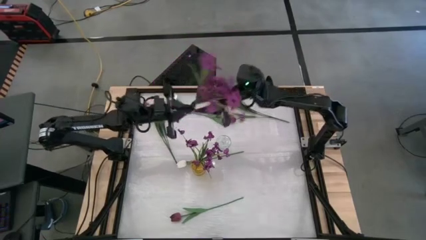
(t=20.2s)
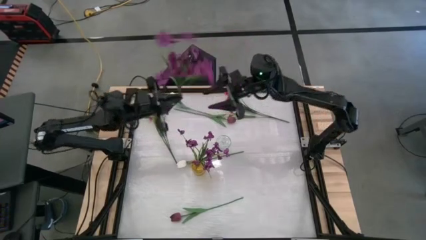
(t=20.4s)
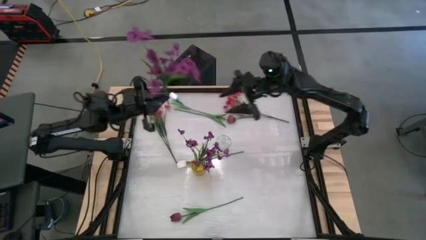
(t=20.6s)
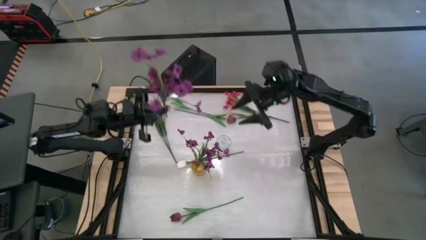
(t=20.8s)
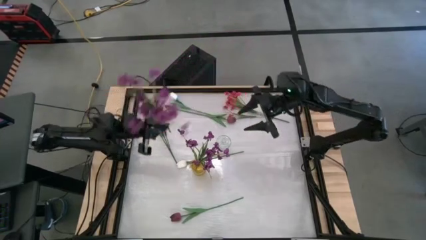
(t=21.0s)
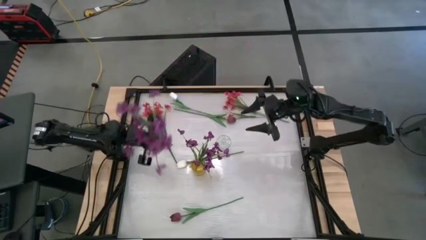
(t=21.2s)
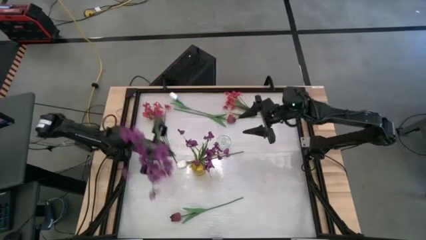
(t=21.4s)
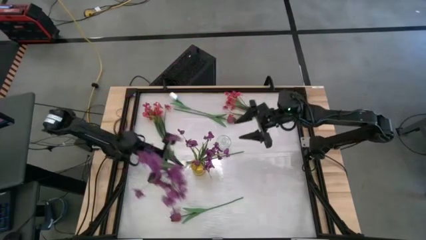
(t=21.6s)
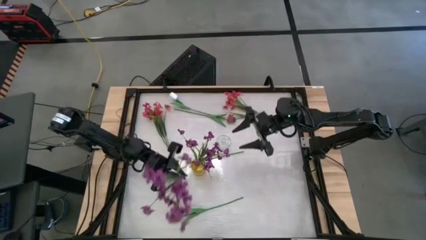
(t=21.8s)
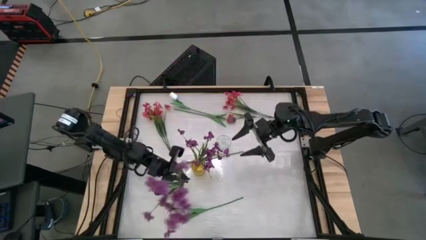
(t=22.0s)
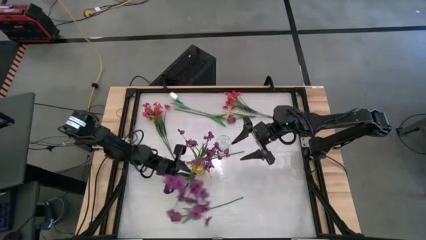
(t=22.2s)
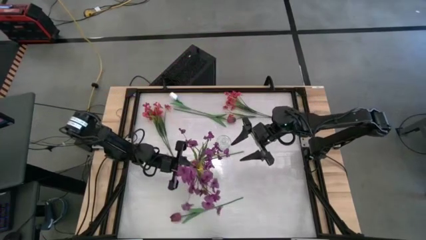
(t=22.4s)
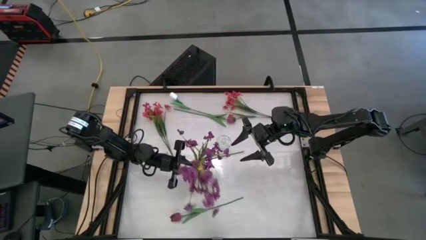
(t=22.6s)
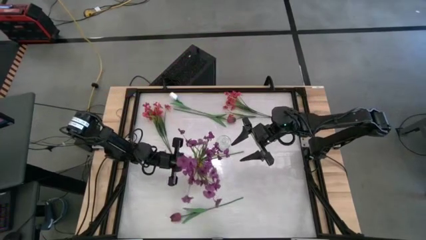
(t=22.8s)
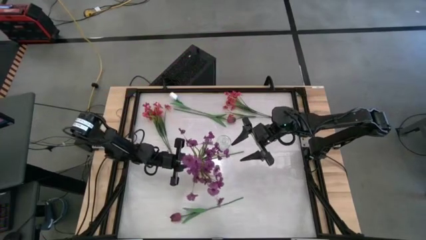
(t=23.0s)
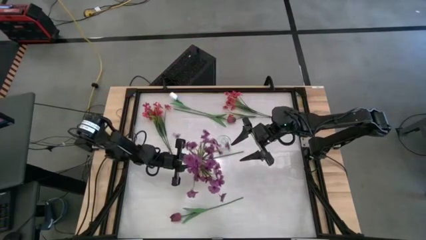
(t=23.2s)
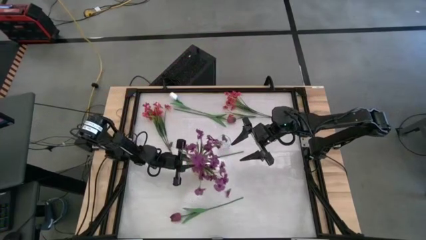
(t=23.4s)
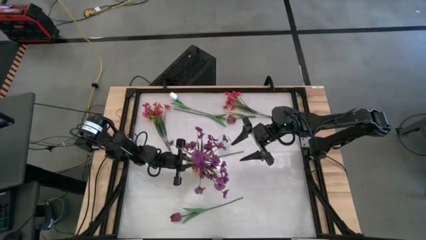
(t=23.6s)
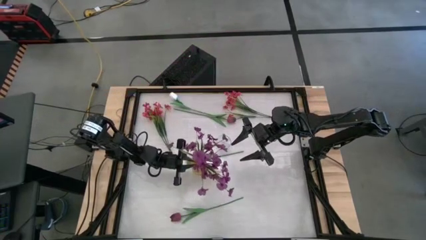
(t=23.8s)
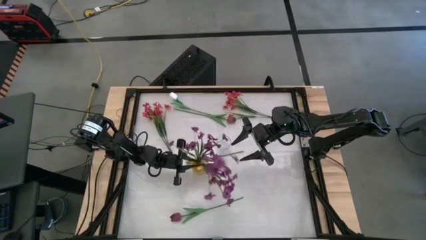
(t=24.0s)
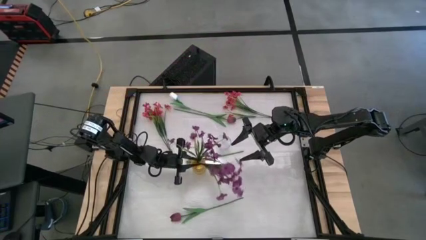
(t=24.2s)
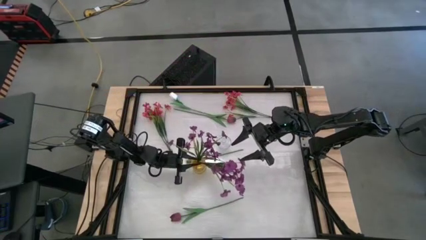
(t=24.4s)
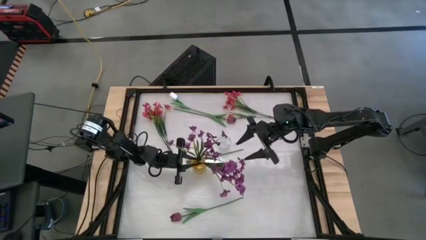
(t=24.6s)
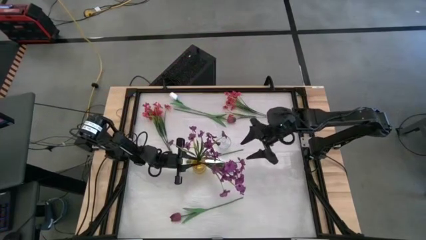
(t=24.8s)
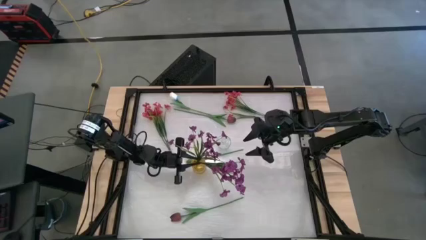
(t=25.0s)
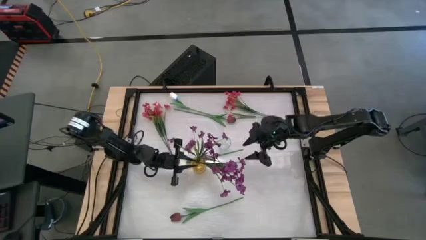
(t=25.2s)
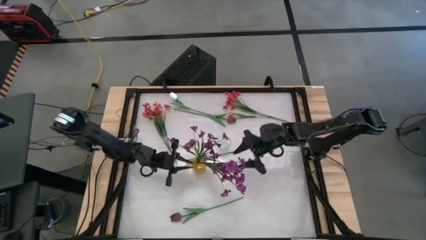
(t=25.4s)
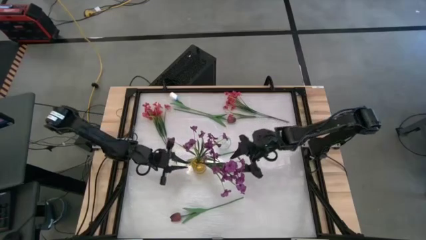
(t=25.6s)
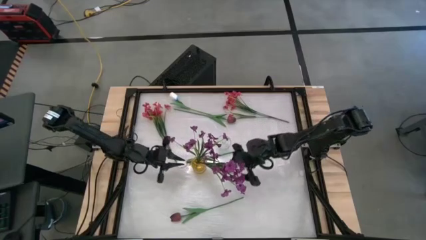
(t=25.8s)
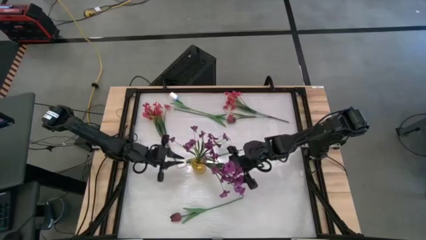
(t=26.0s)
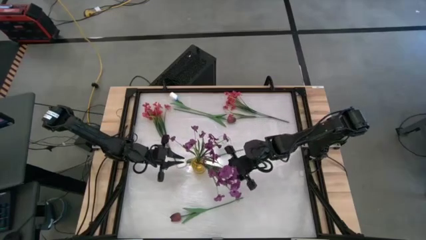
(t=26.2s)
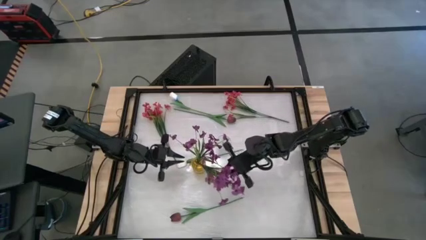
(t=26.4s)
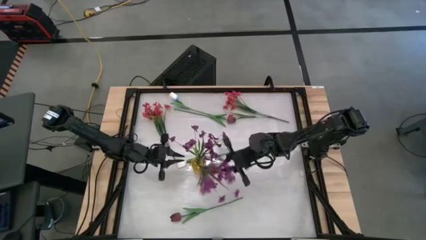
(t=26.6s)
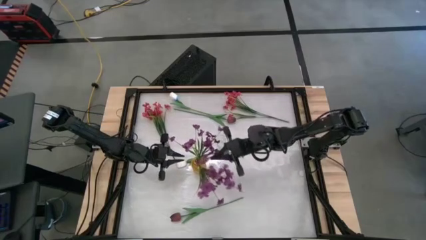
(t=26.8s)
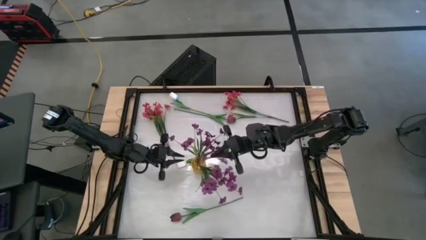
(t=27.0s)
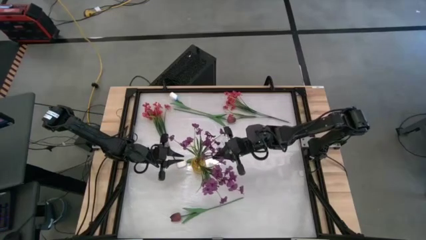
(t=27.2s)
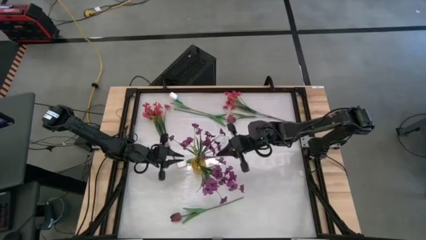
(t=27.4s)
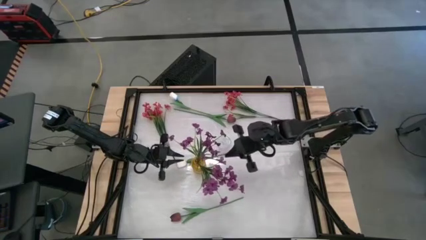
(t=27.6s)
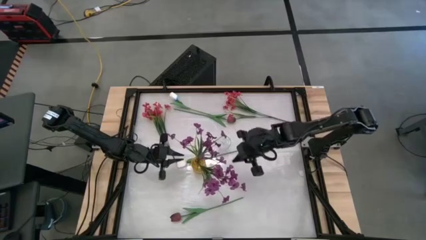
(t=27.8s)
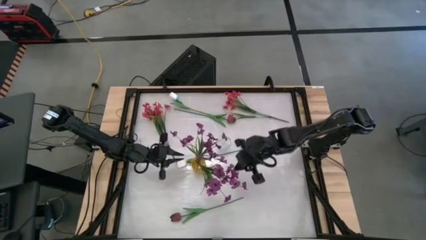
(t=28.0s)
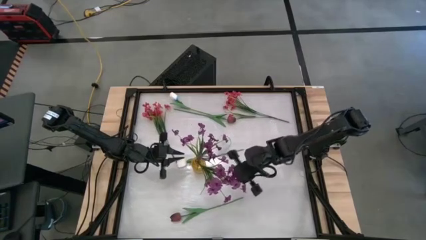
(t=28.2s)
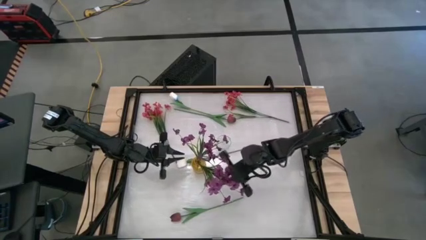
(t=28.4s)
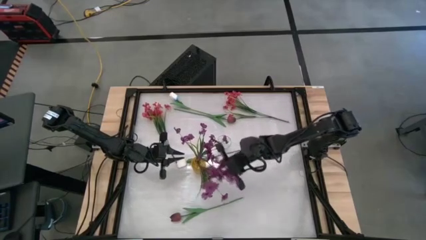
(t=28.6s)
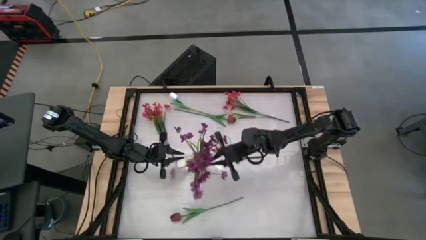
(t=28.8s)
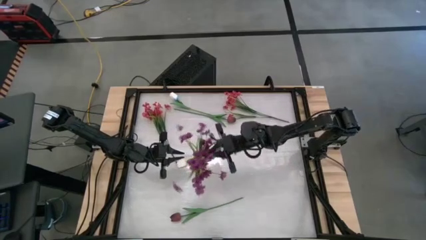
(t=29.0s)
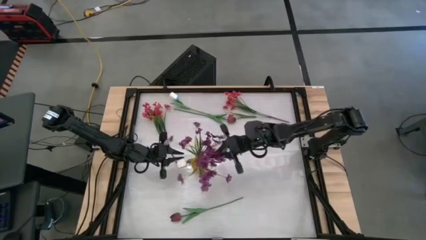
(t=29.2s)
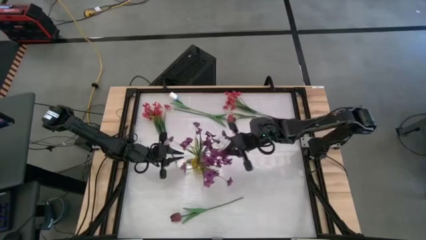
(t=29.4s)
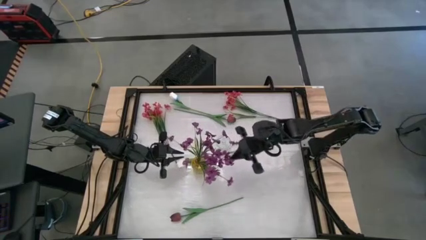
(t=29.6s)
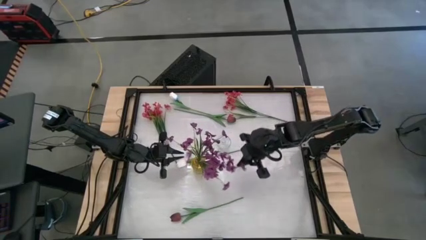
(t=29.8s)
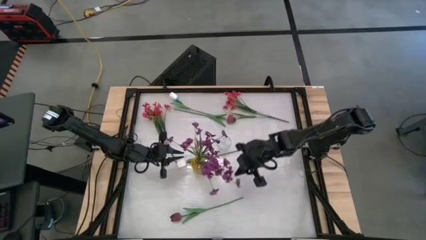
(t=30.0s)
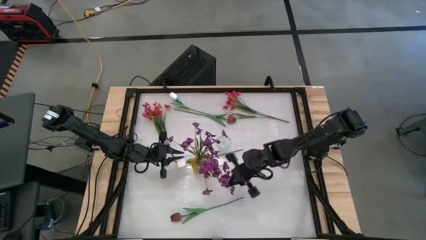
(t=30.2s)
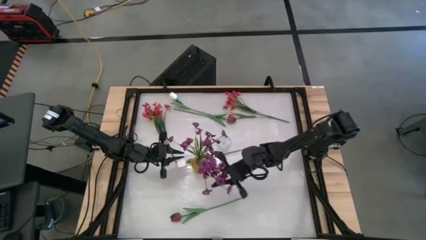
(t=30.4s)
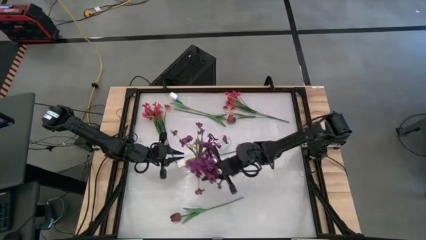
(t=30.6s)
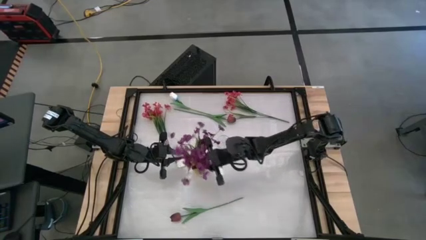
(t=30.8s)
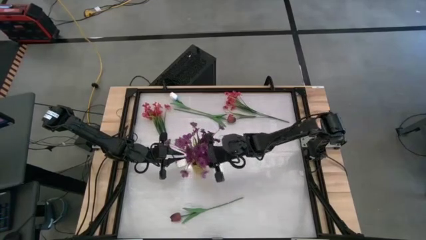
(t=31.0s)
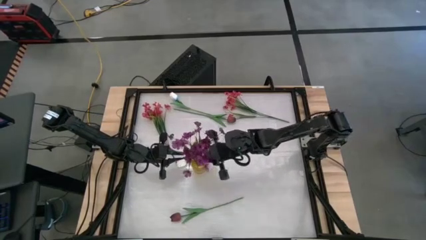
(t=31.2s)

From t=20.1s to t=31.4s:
Task: Sort flowers into vase by color
Put the purple flowers into the yellow vase

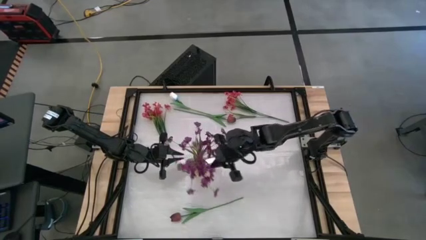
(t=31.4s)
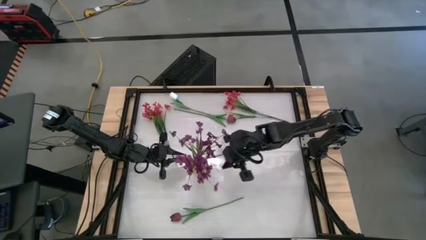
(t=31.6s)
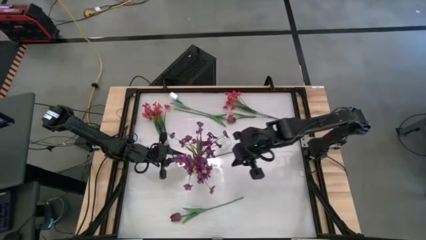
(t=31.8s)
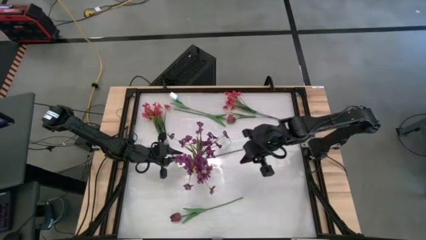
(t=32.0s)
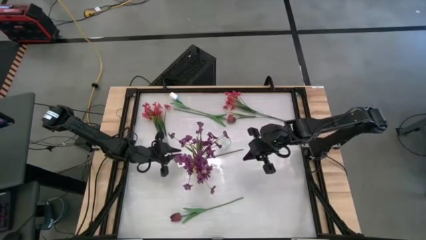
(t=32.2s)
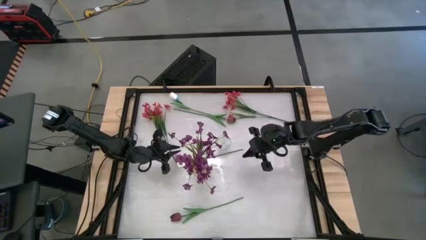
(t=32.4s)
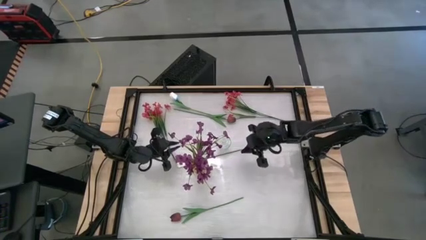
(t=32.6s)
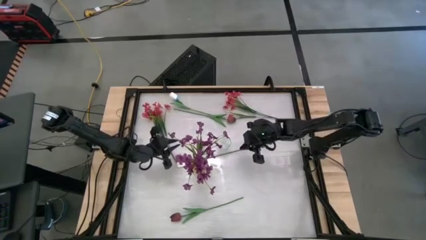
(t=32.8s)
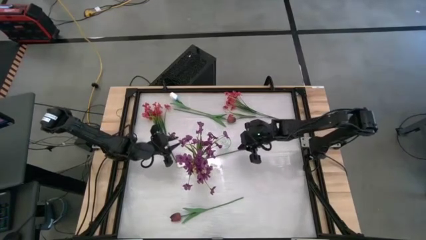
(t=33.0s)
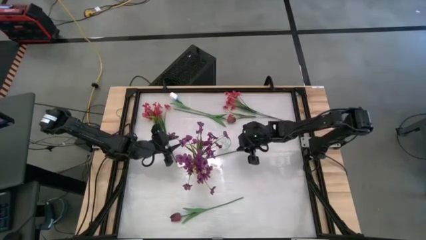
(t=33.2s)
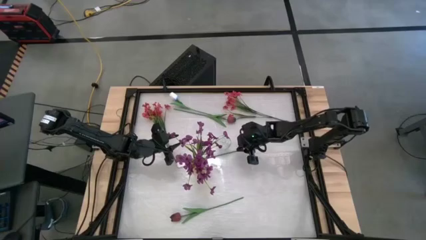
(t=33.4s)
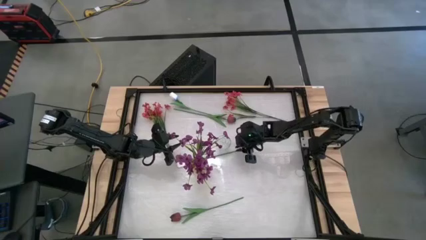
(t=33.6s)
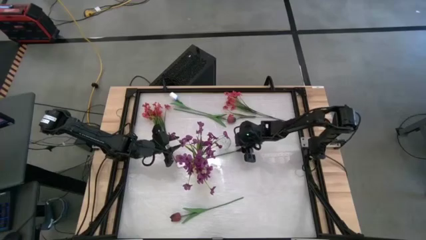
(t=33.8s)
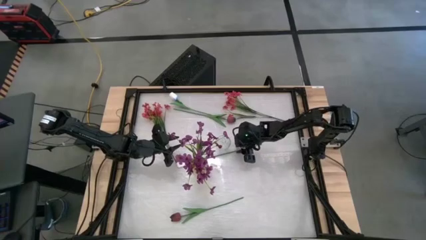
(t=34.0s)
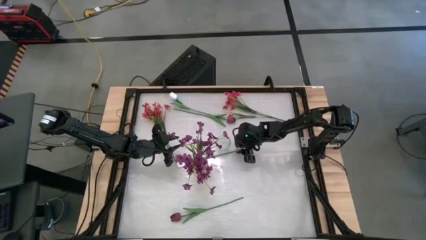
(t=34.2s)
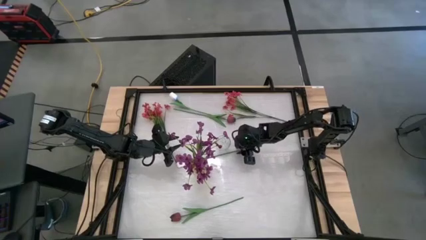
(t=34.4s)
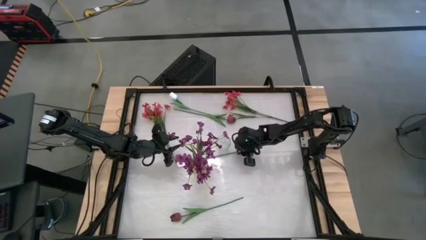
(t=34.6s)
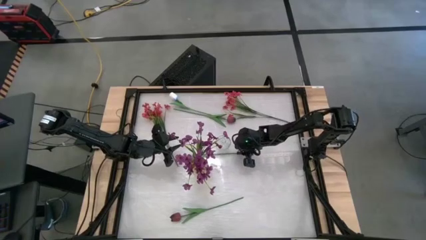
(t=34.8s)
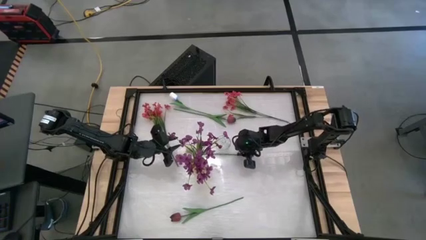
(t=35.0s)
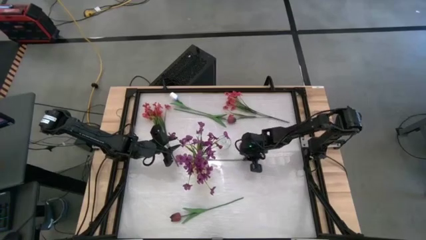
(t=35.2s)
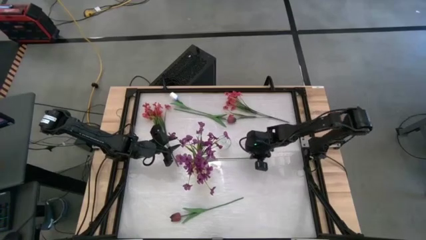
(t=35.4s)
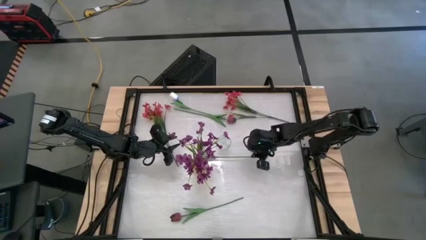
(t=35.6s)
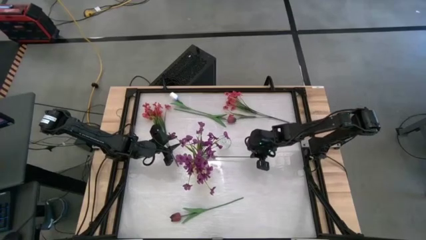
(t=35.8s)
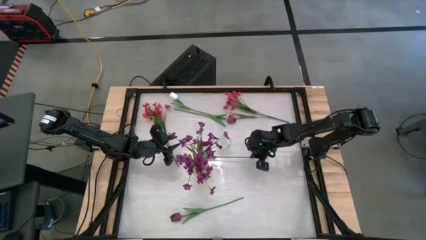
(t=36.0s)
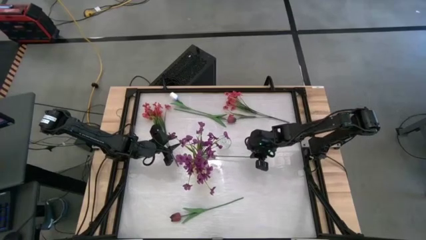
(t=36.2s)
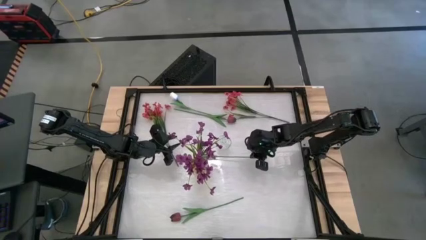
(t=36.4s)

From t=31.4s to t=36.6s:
Adjust the bottom white tulip
